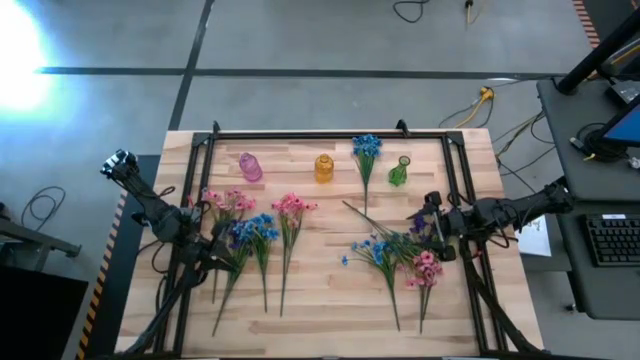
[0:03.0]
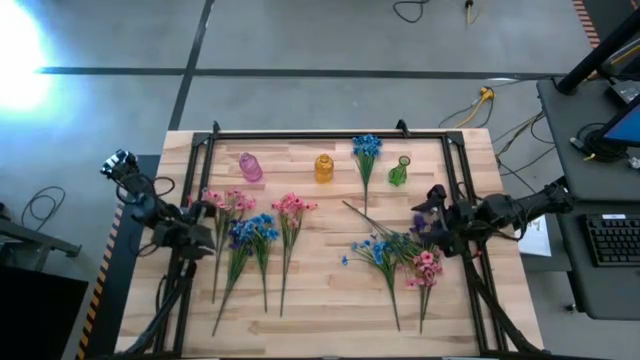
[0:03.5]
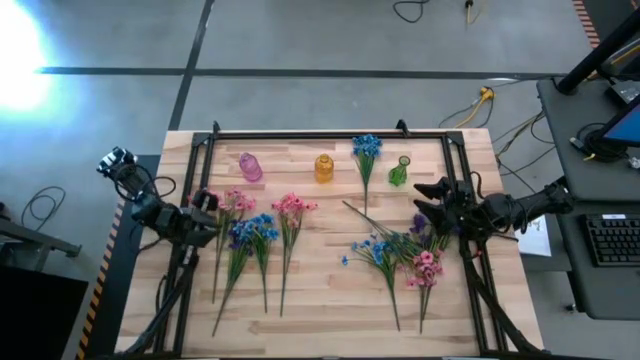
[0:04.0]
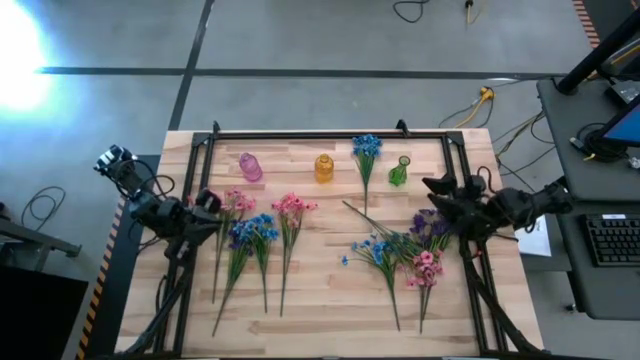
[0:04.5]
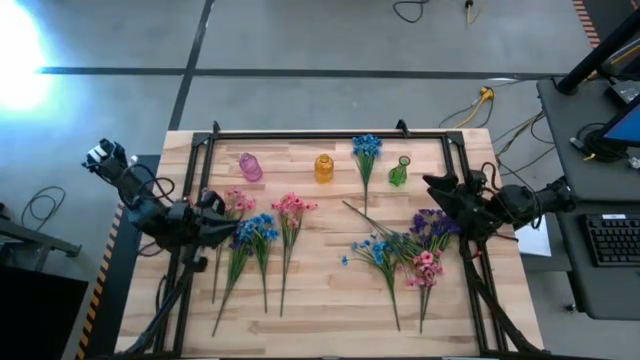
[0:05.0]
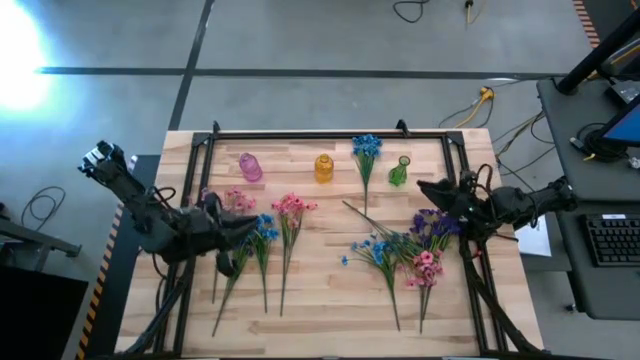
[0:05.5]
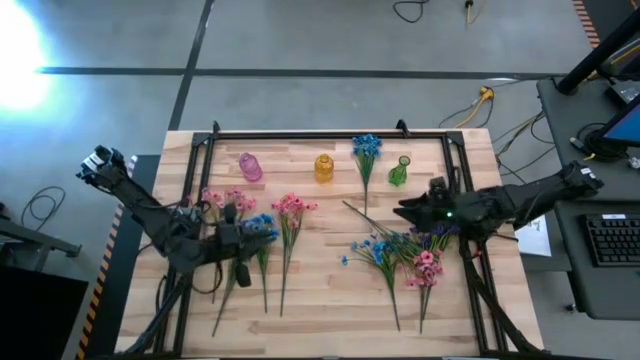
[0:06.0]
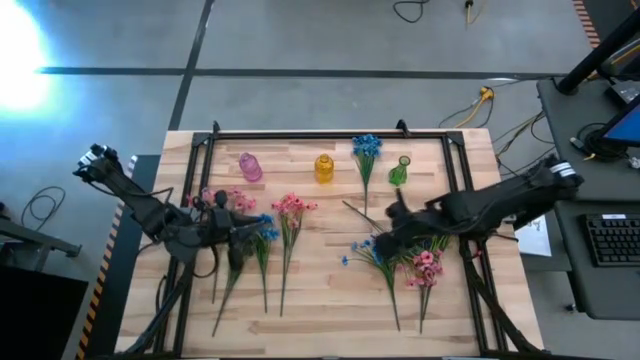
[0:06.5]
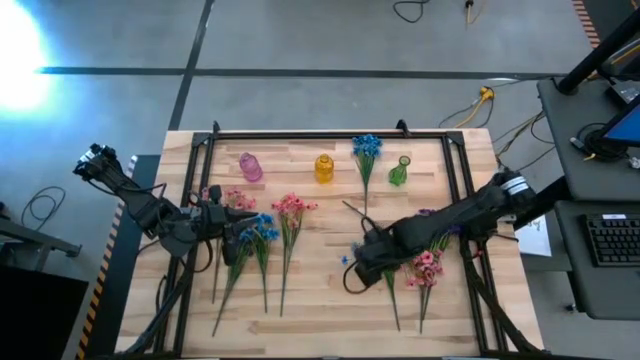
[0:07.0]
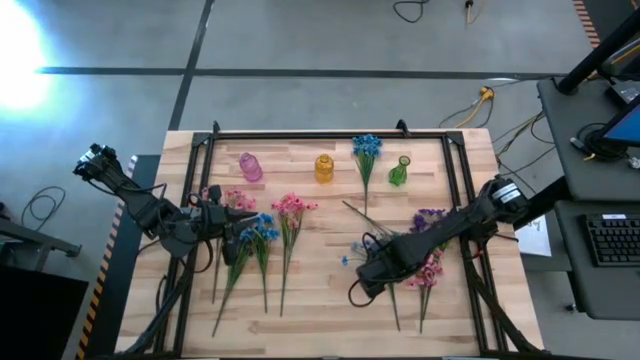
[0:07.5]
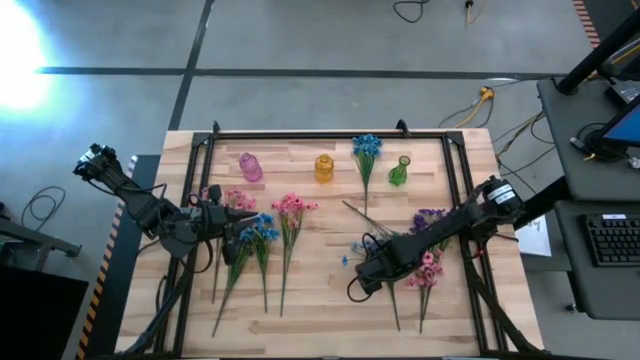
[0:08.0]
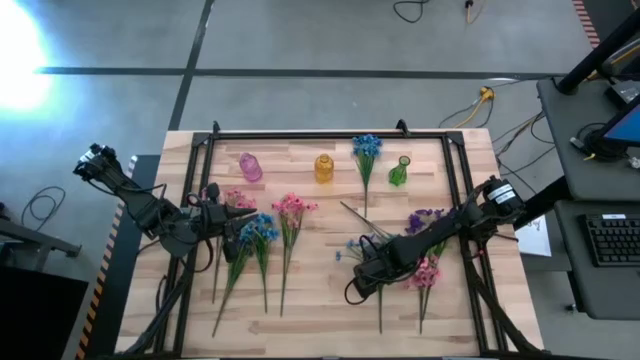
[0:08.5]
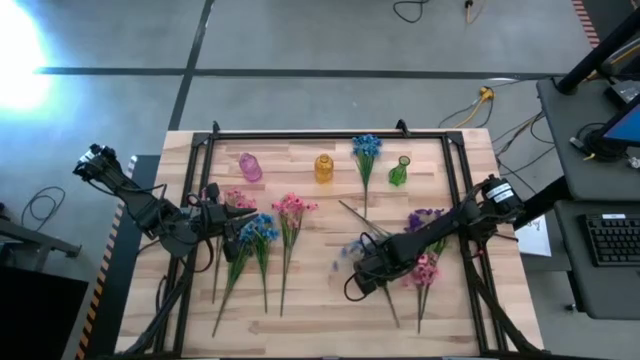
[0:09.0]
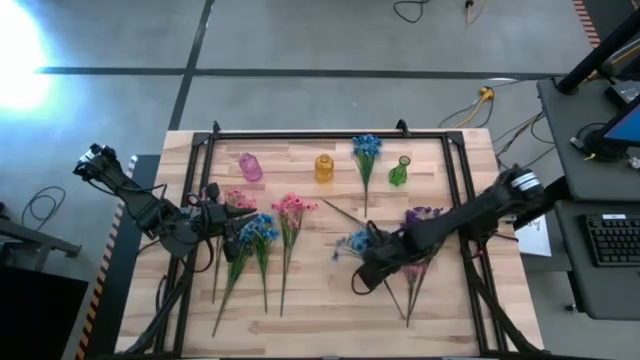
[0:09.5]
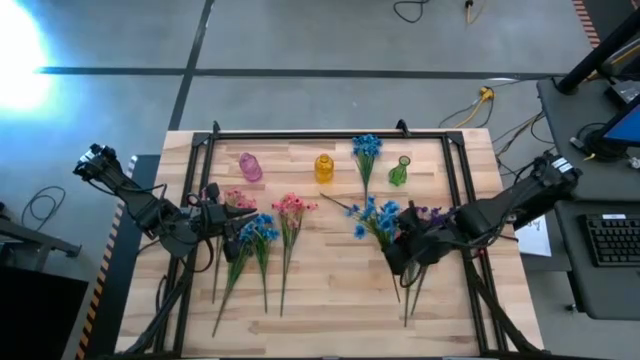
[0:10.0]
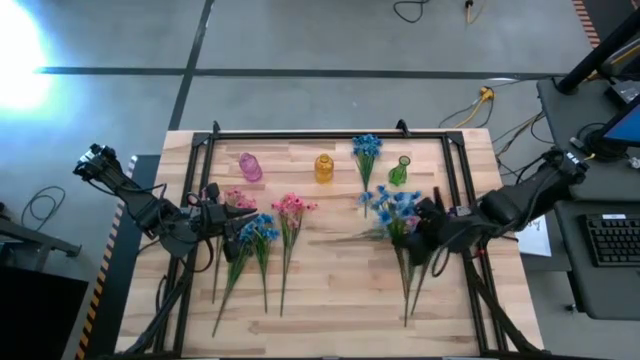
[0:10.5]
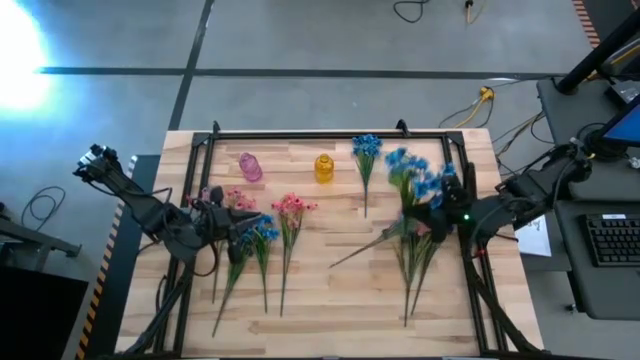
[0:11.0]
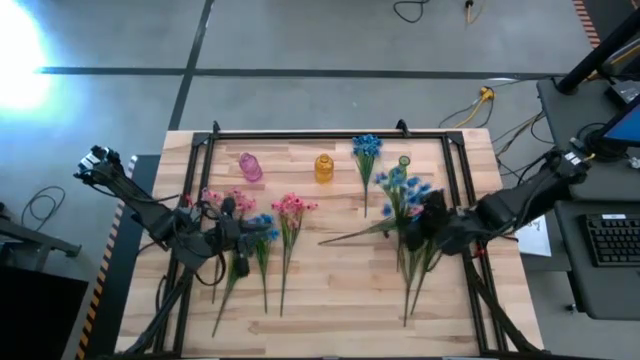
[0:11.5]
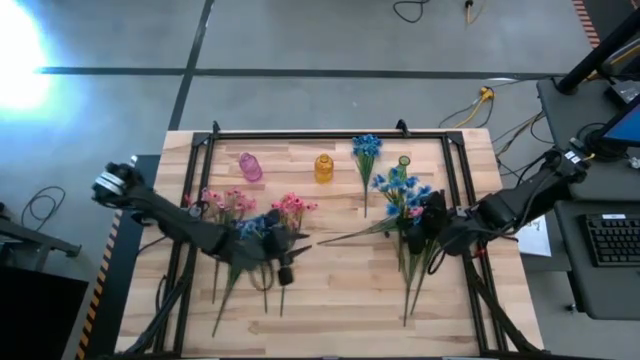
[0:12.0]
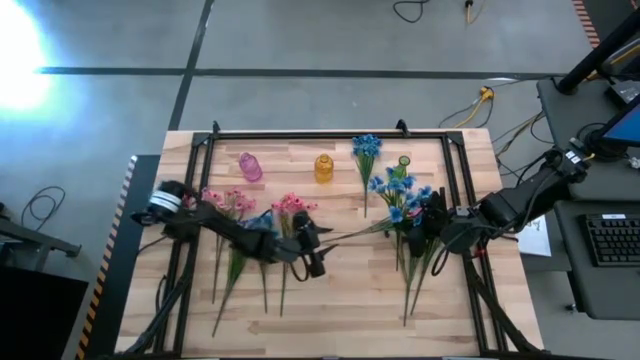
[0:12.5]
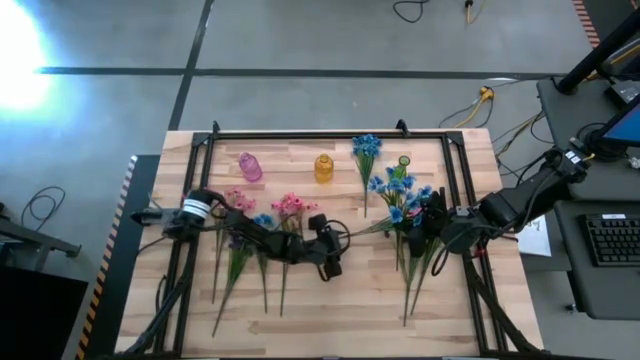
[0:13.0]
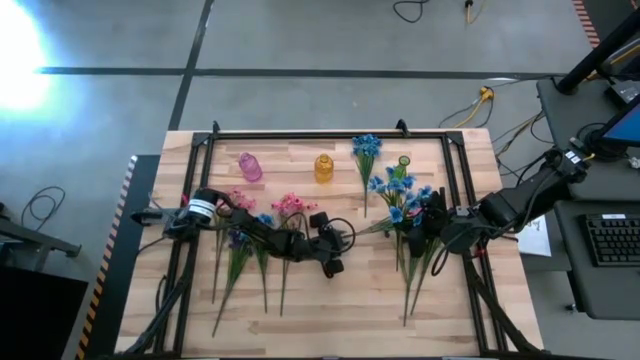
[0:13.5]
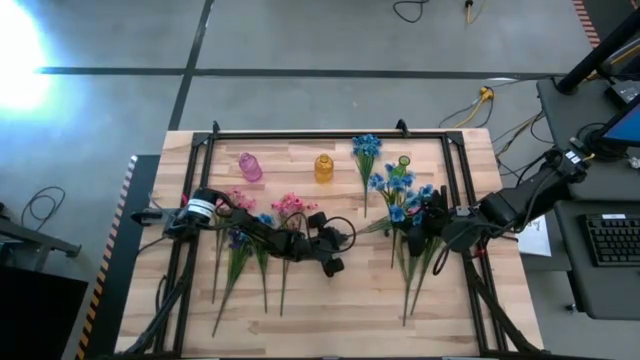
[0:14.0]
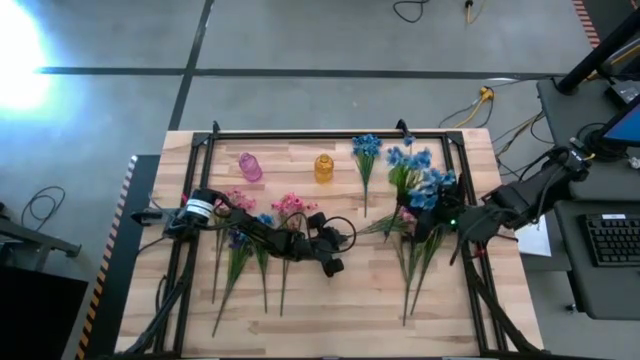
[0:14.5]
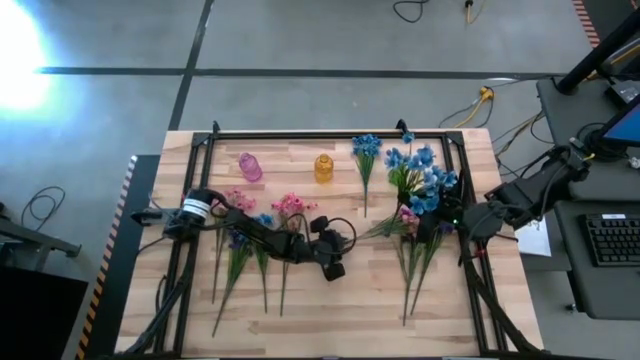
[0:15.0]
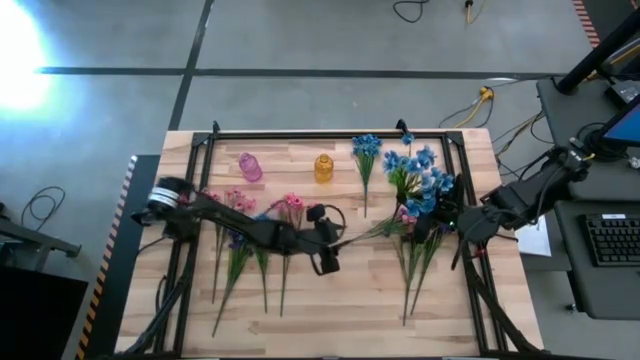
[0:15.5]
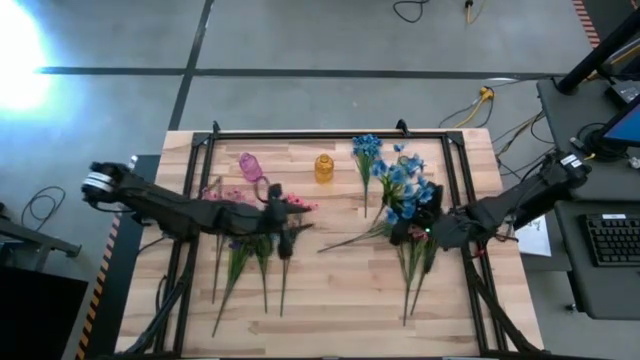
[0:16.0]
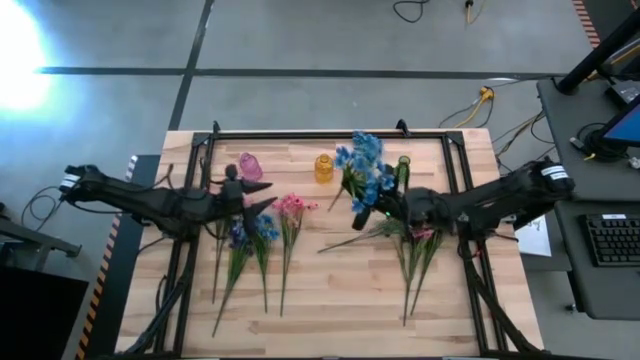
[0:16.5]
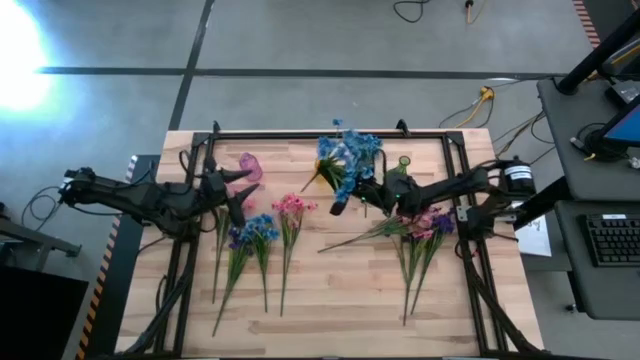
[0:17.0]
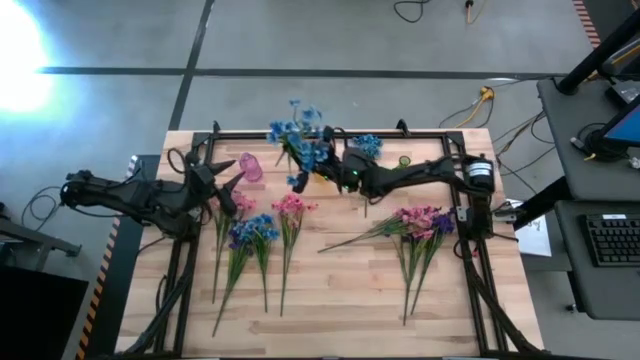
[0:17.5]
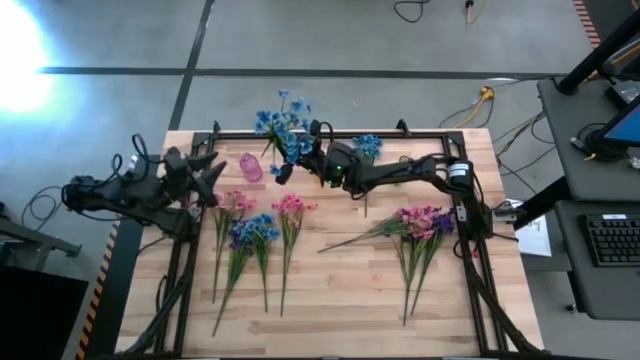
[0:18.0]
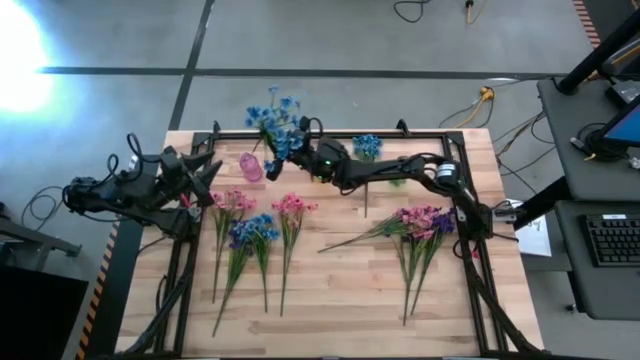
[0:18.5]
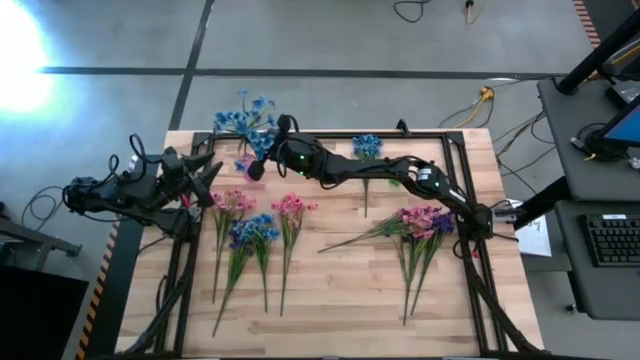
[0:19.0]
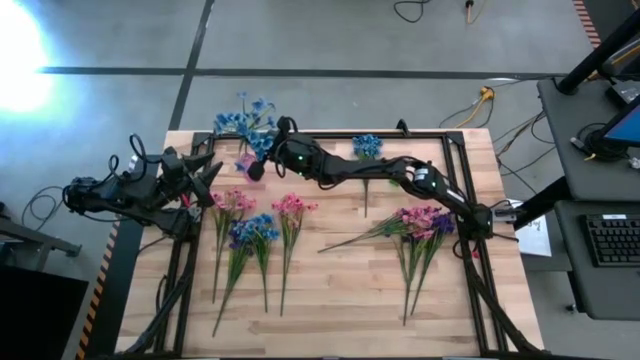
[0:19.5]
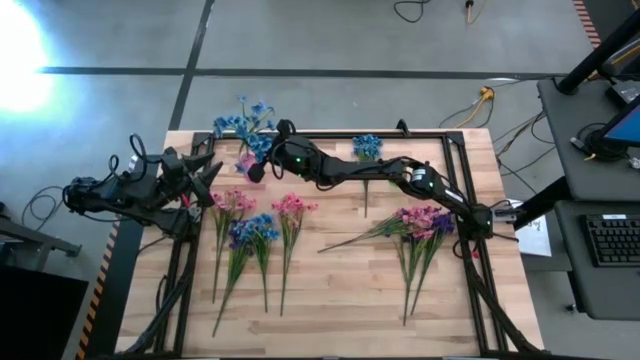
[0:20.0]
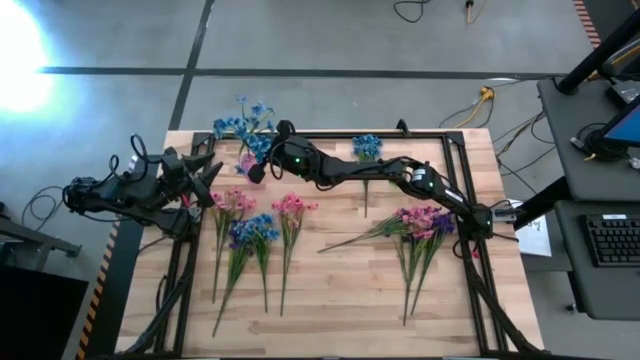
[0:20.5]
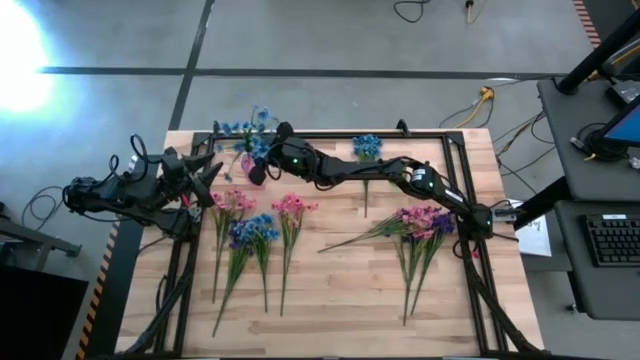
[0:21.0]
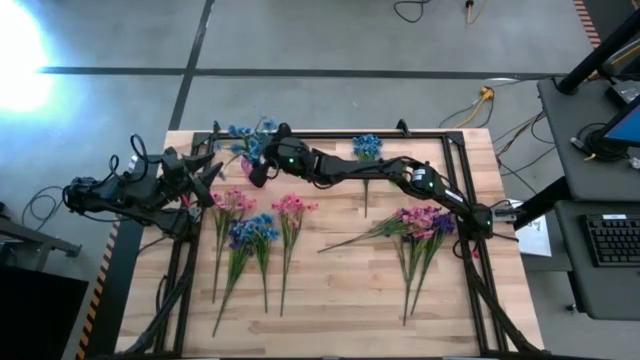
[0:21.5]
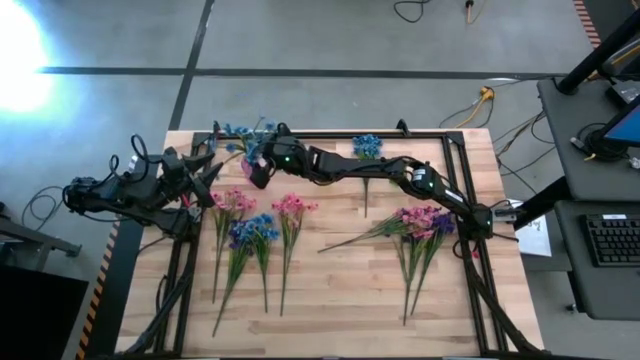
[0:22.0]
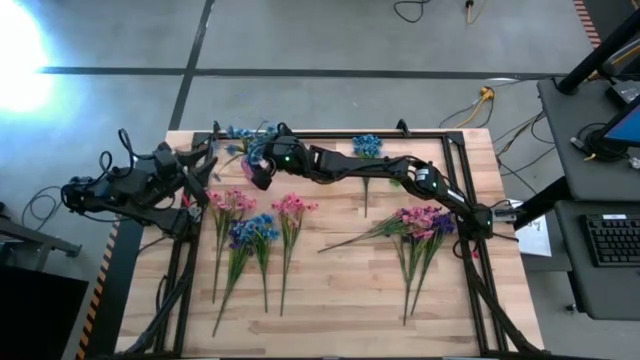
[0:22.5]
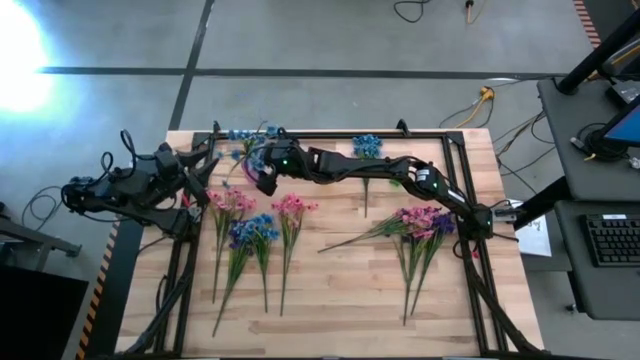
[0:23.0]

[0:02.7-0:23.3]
Task: Sort flowers into vase by color
Put the bottom right blue flowers into the violet vase
